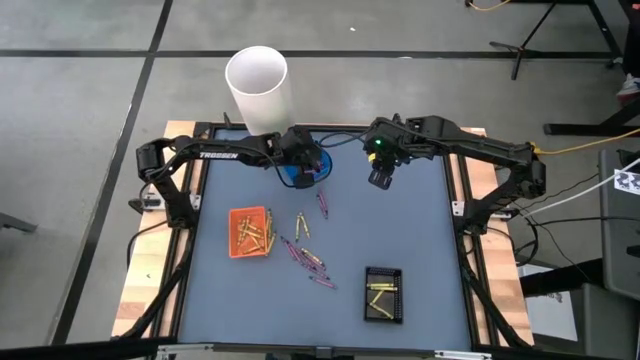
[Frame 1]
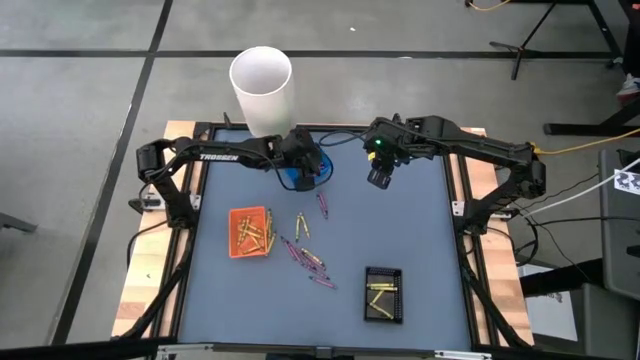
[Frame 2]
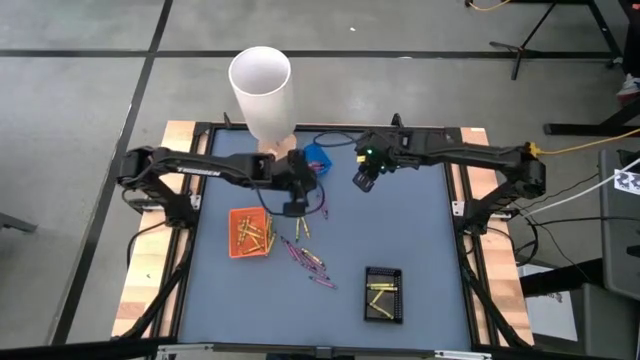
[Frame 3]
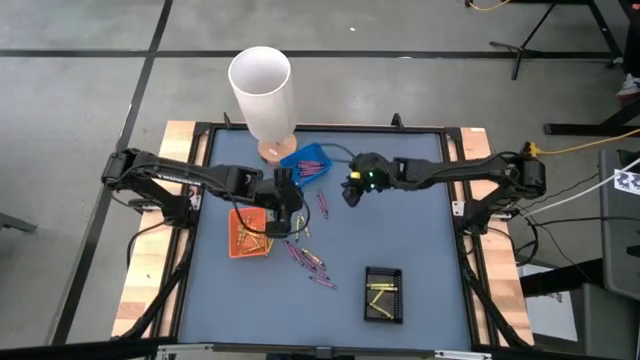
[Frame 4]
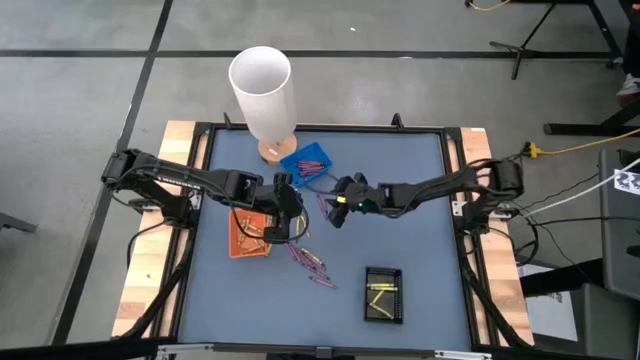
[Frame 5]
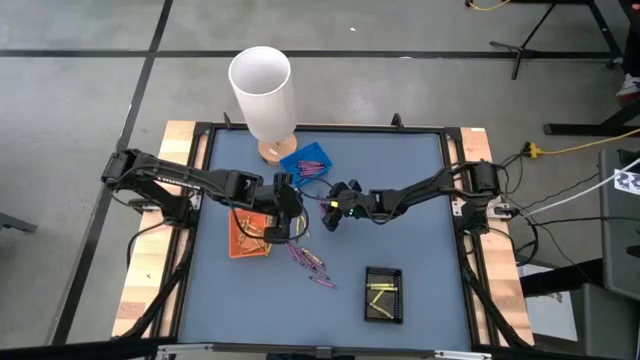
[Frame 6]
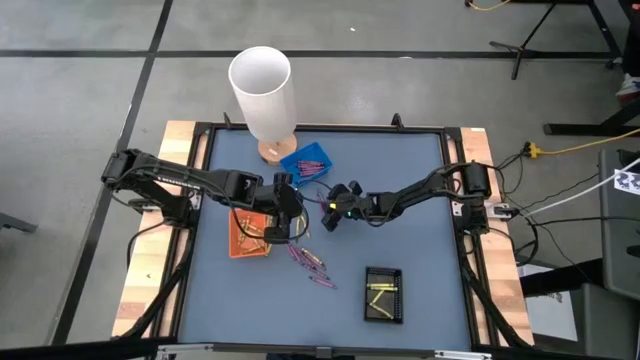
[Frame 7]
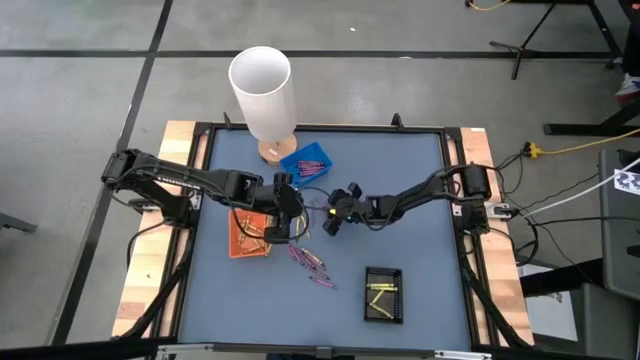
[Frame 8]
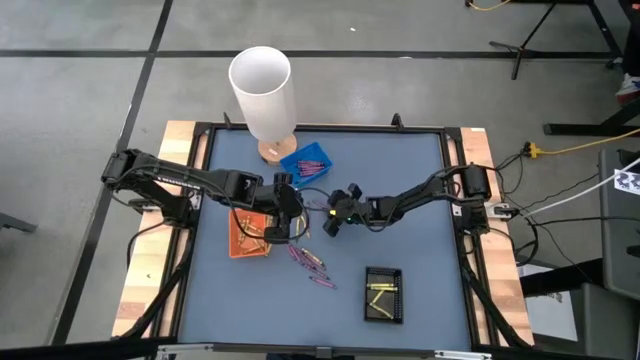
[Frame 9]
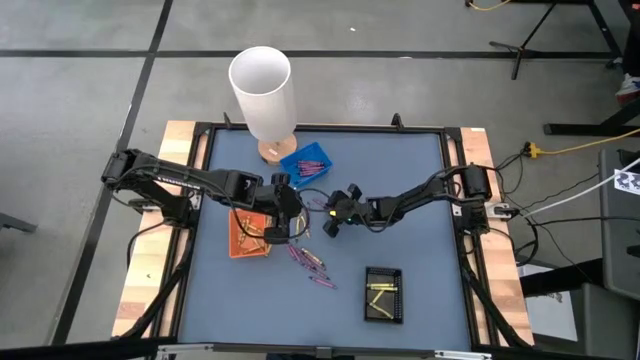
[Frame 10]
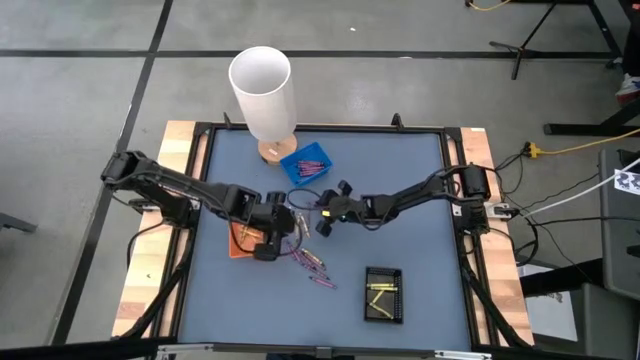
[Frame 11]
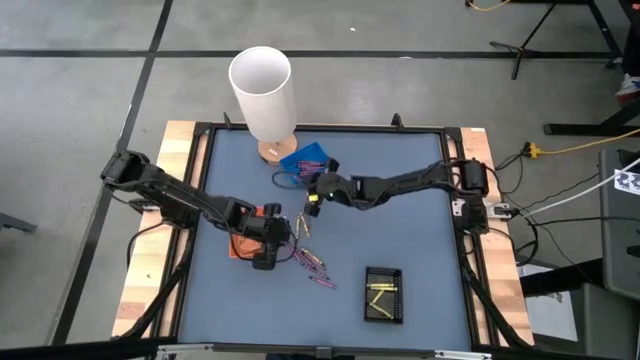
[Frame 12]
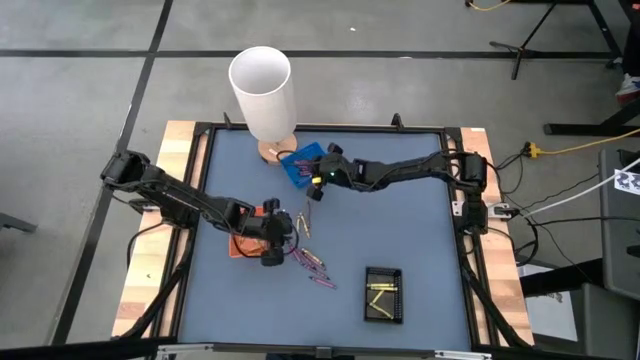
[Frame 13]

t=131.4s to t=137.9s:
Task: Sort crayons
Put the violet crayon into the blue bin

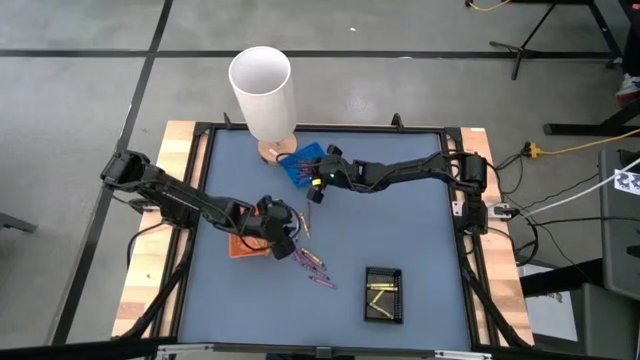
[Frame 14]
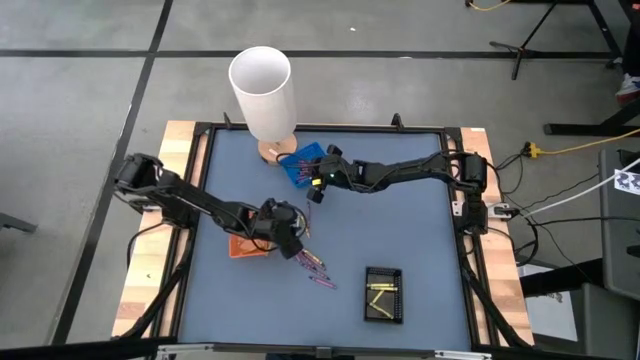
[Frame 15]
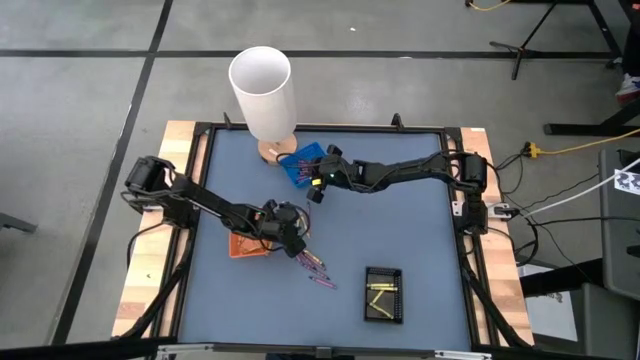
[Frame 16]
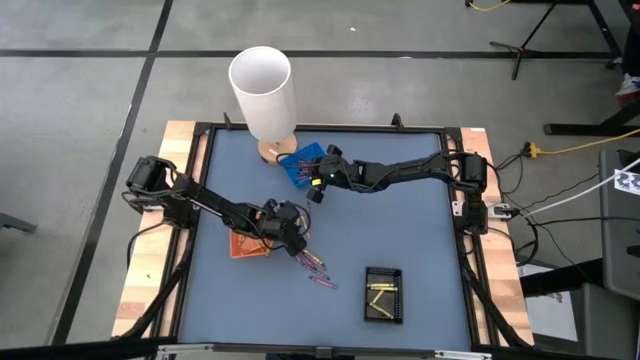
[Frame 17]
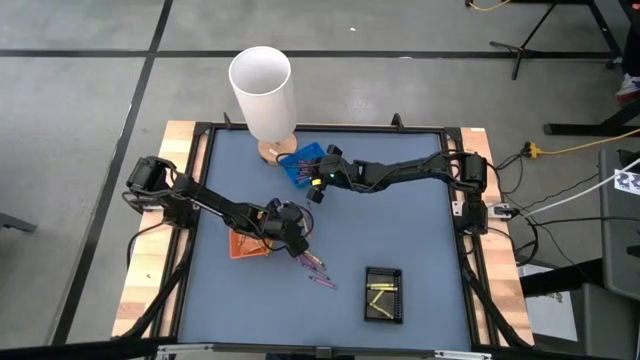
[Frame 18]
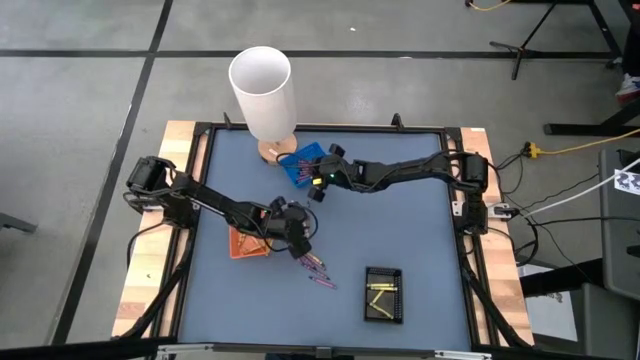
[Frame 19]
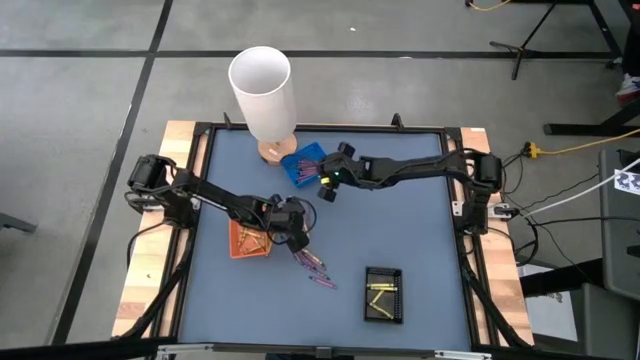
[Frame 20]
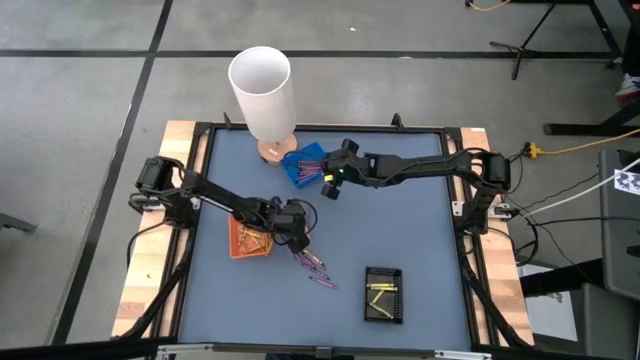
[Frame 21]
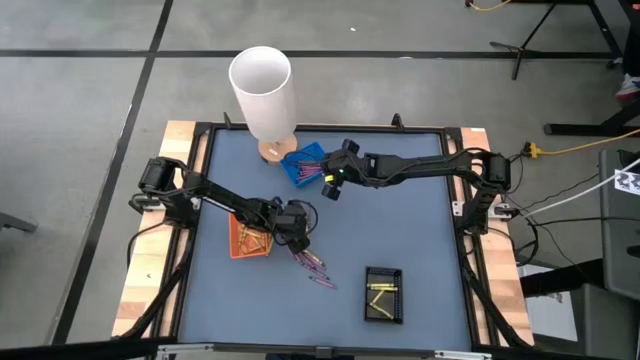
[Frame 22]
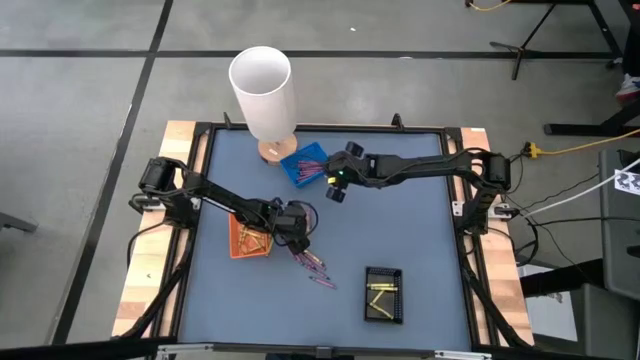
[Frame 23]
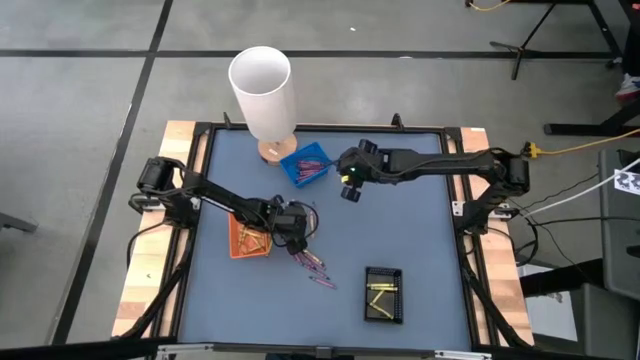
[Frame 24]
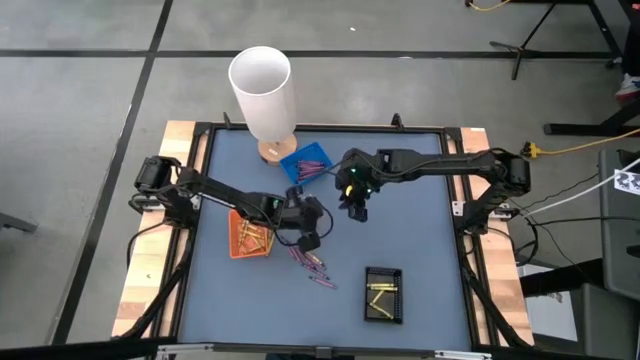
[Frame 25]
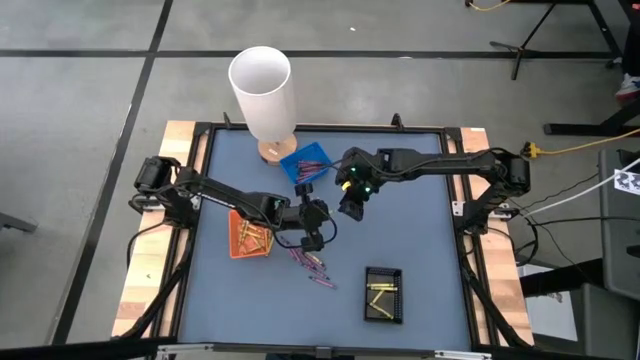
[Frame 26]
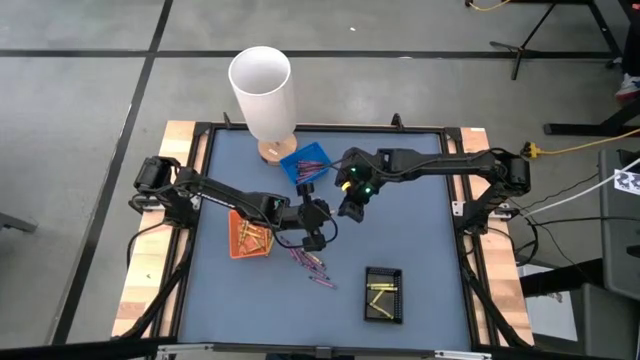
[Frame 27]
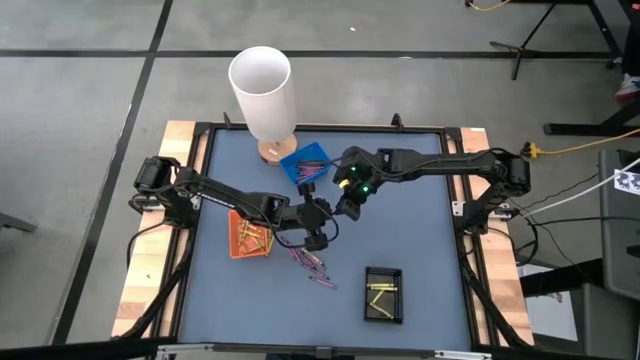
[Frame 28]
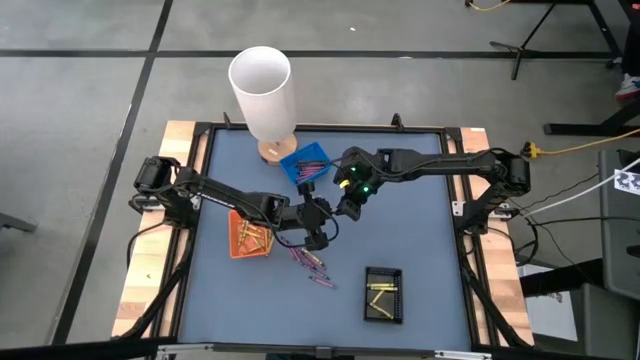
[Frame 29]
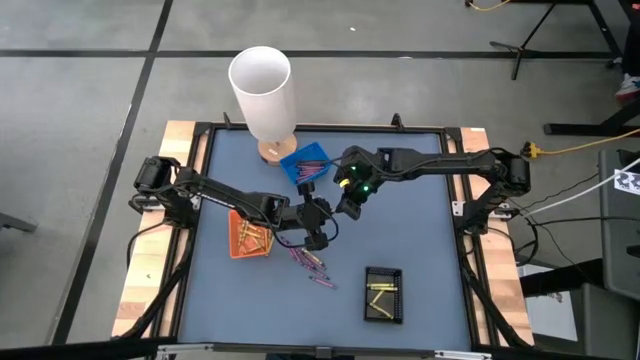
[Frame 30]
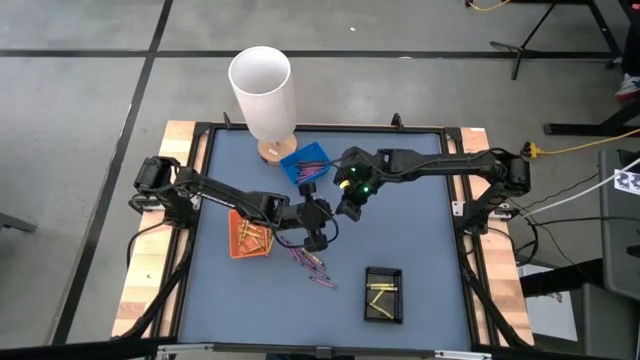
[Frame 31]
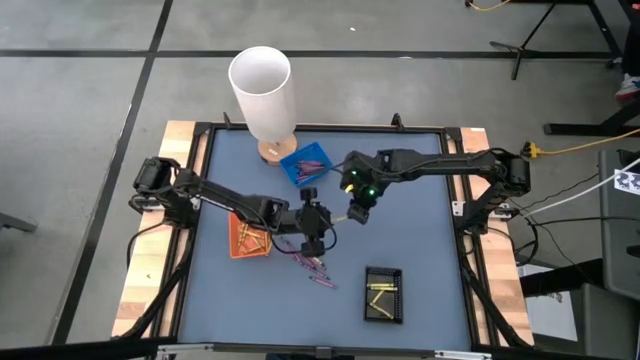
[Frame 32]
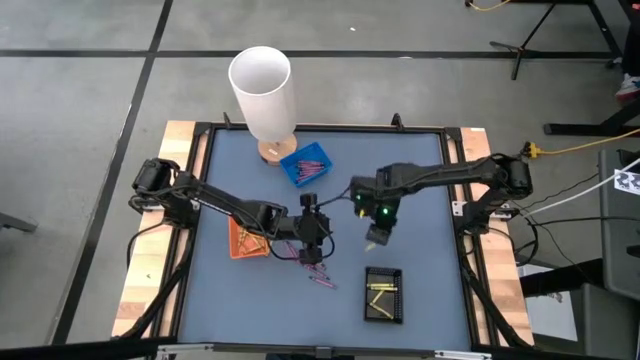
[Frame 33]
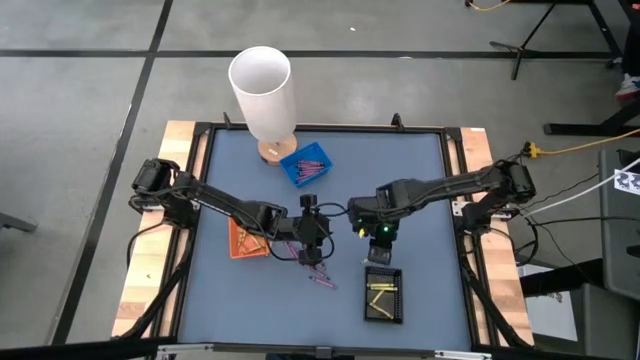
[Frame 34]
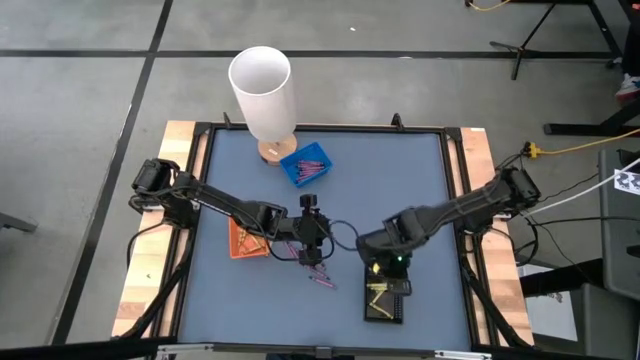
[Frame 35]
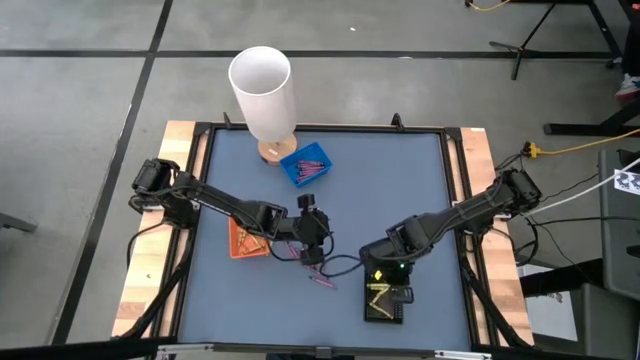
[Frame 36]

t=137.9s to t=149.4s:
Put the green crayon into the black bin

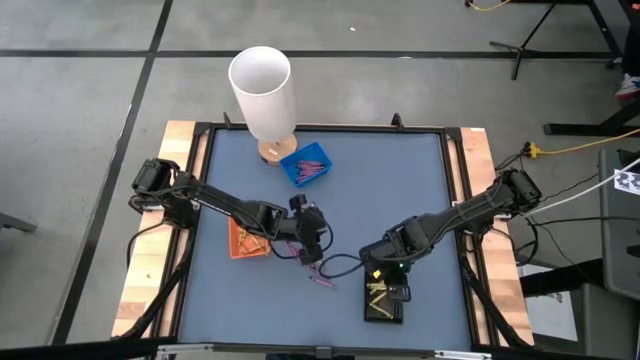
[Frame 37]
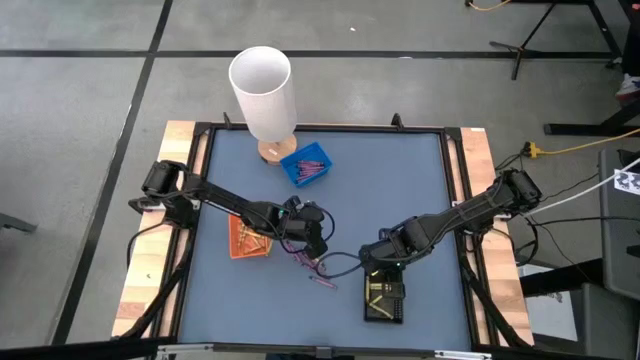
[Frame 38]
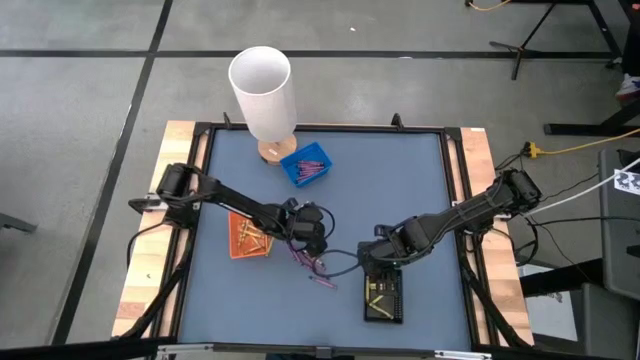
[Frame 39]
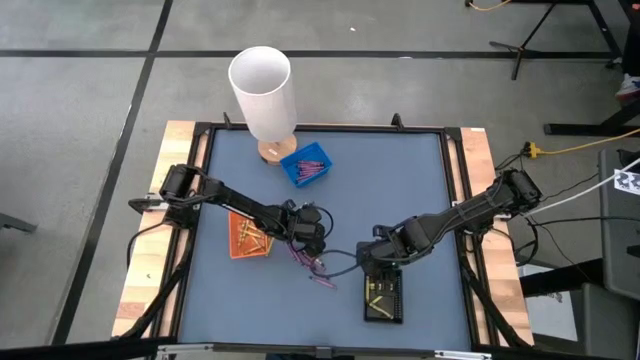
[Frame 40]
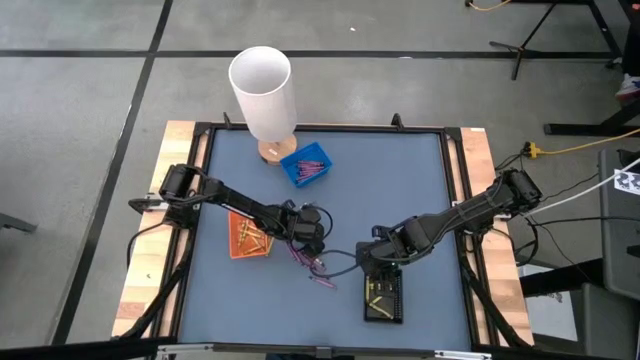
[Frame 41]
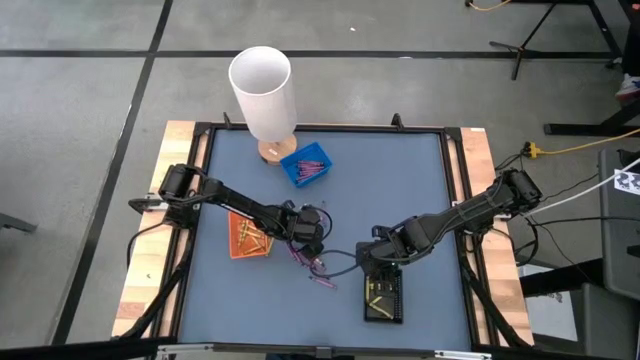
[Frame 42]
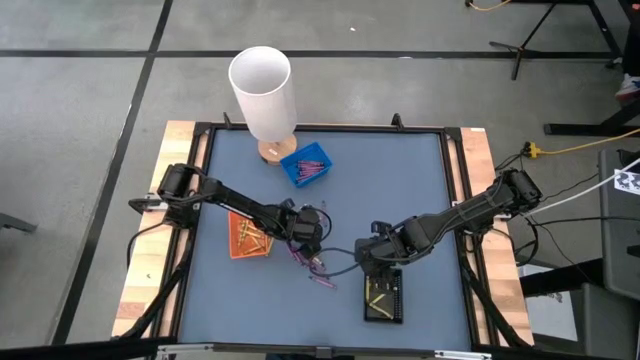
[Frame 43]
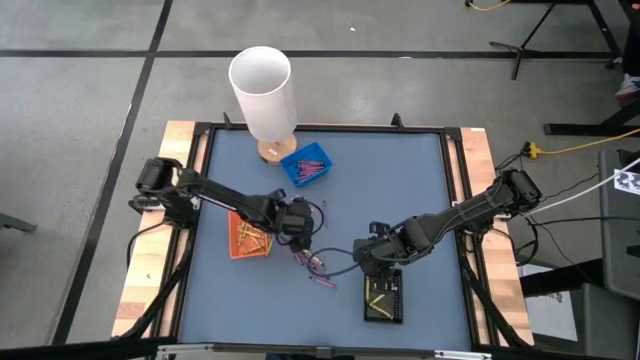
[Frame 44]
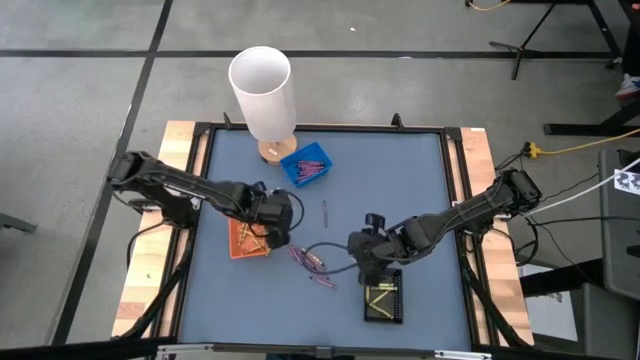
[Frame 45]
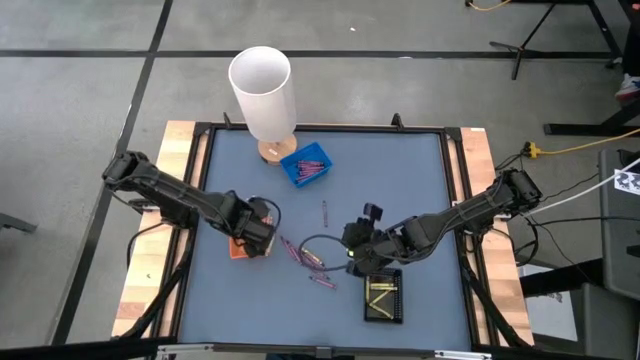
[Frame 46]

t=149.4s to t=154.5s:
Put the yellow crayon into the orange bin
